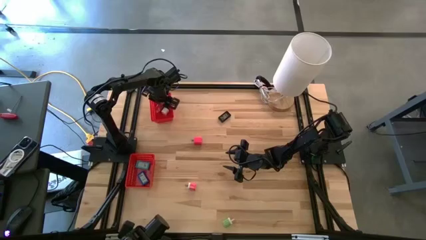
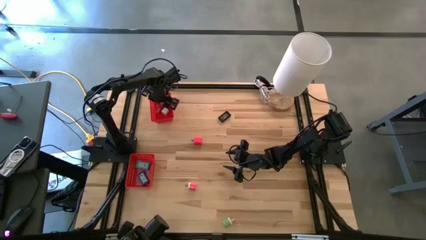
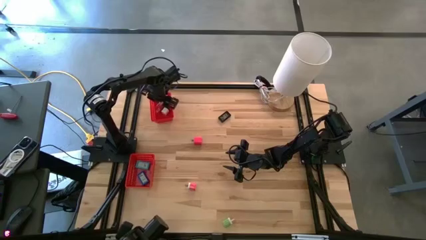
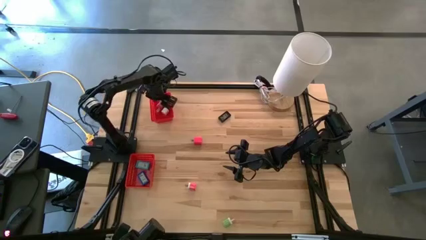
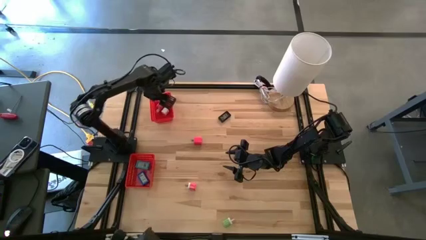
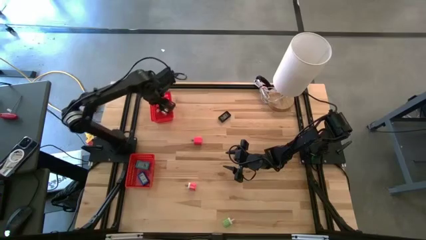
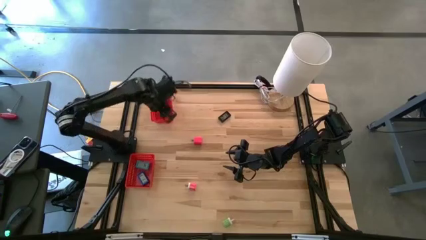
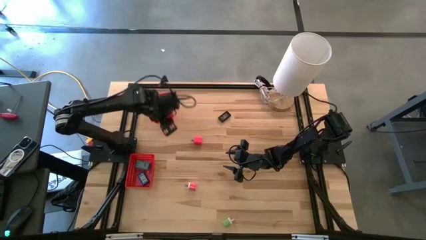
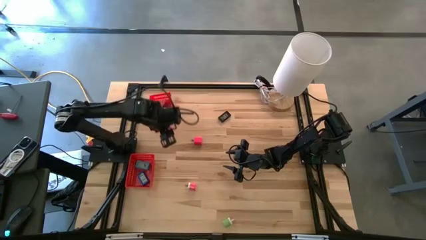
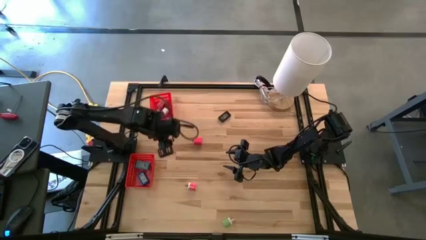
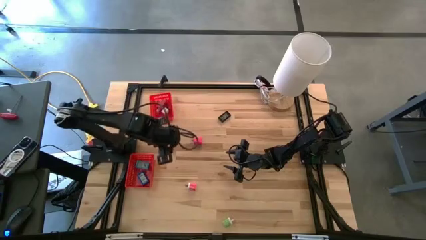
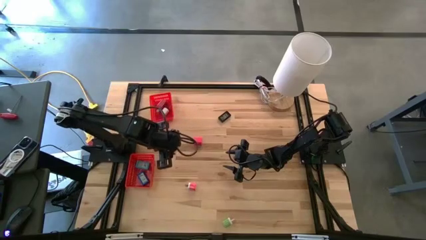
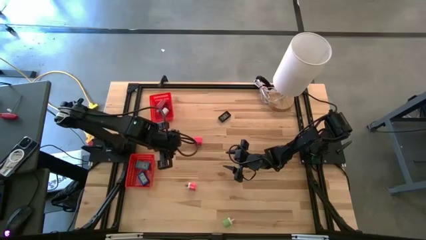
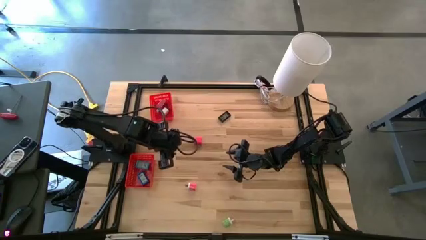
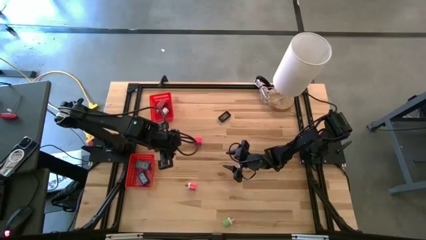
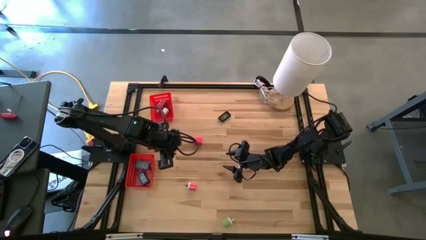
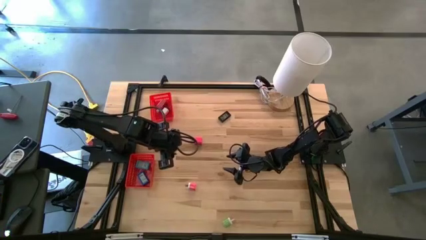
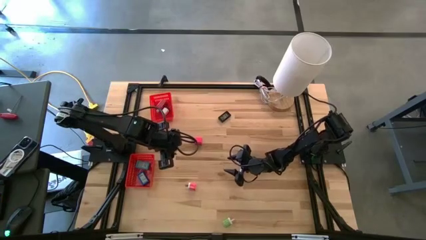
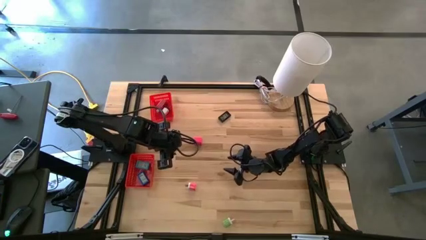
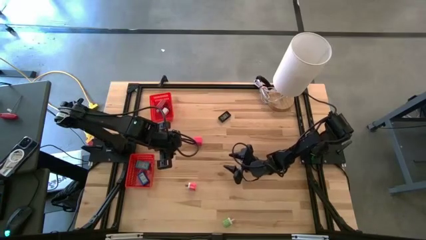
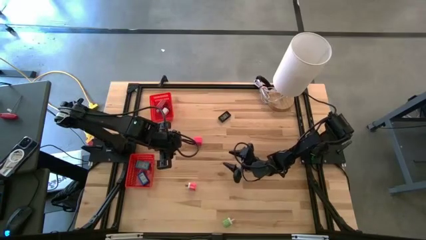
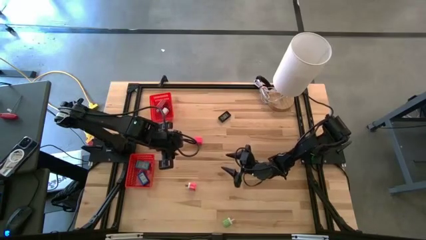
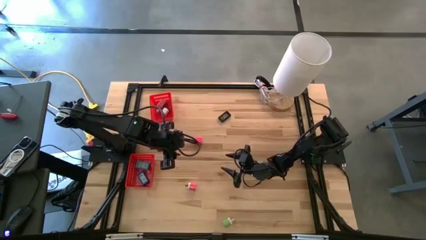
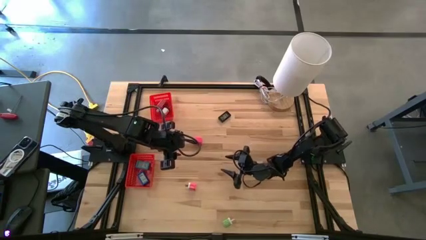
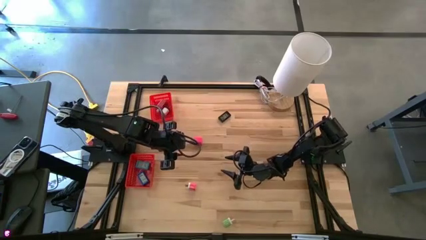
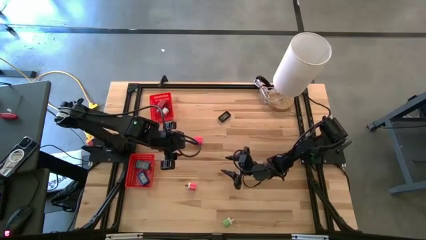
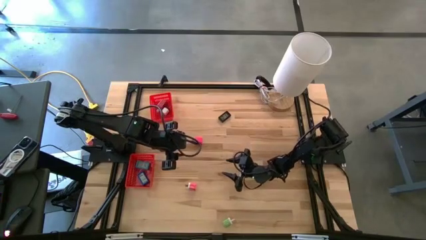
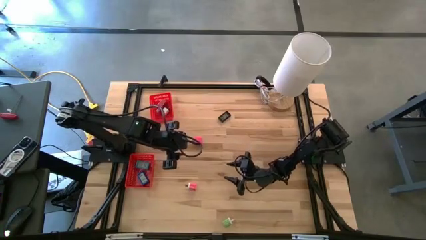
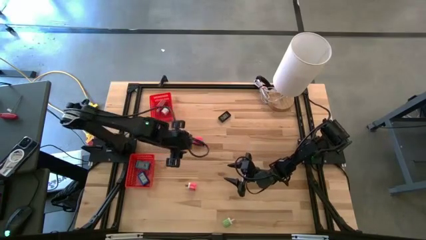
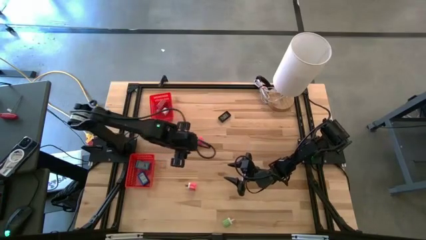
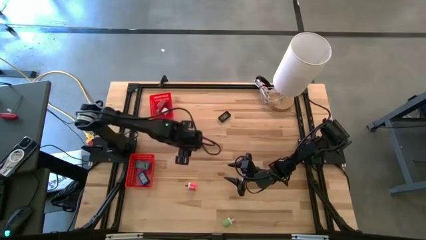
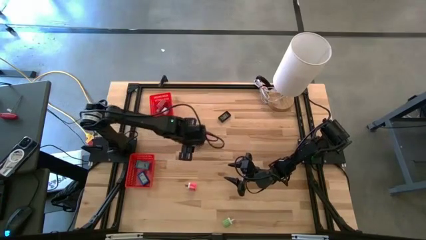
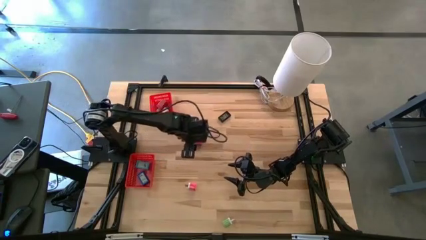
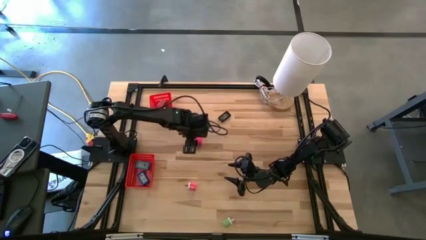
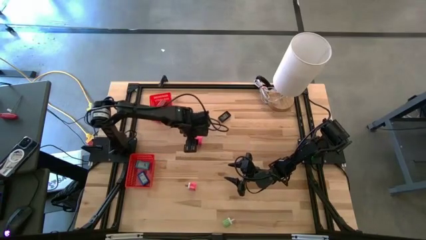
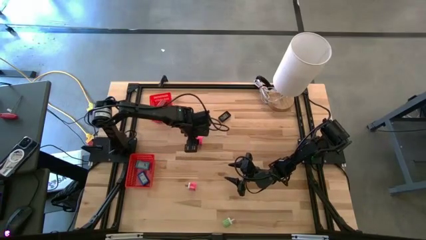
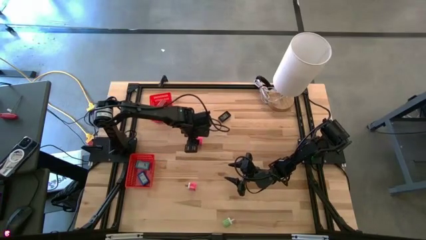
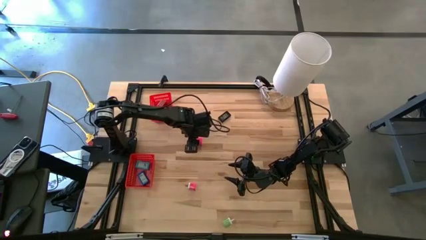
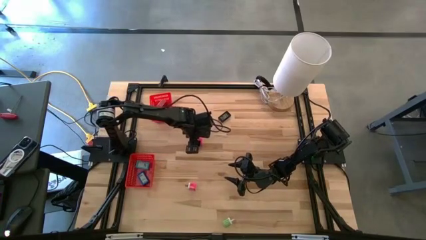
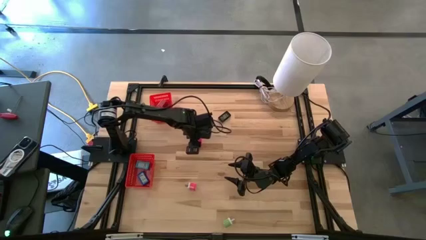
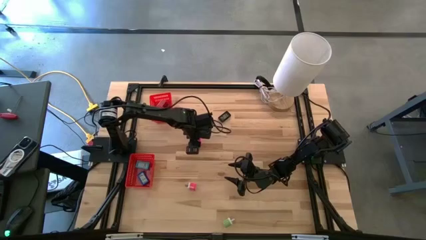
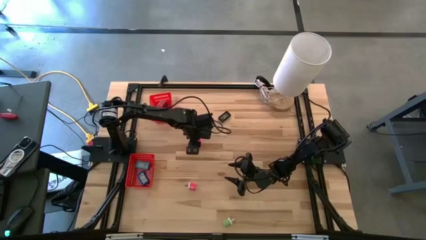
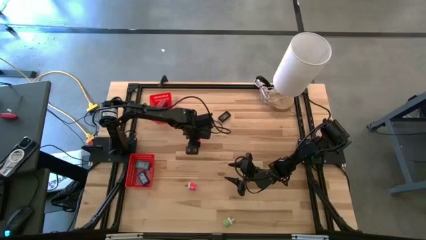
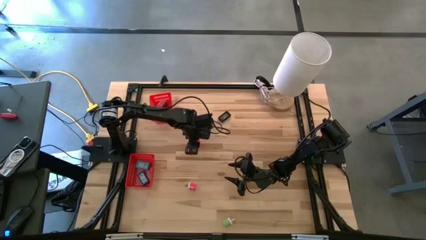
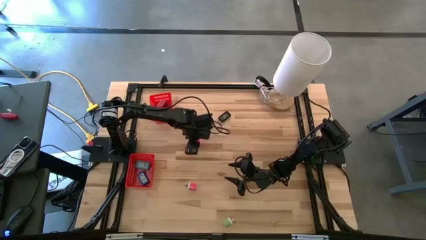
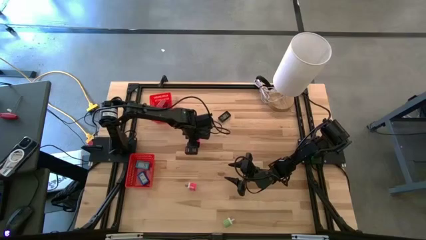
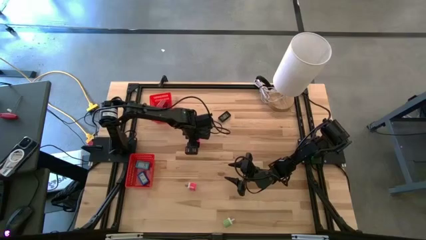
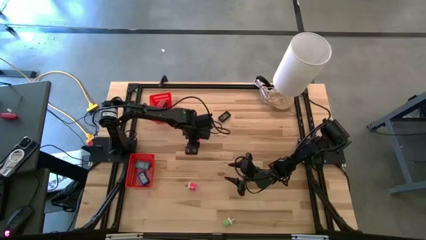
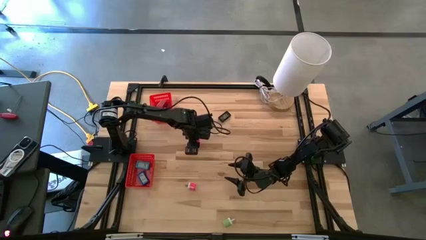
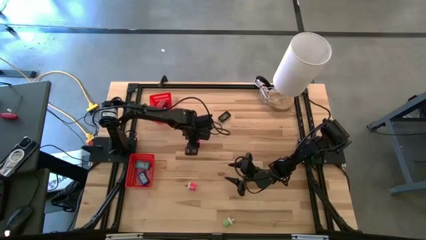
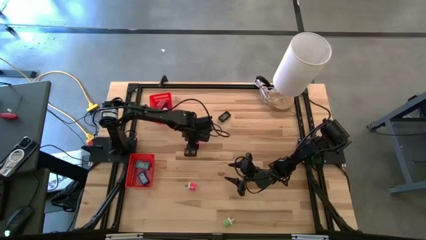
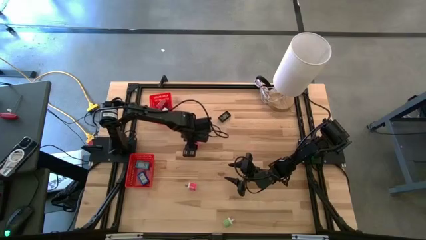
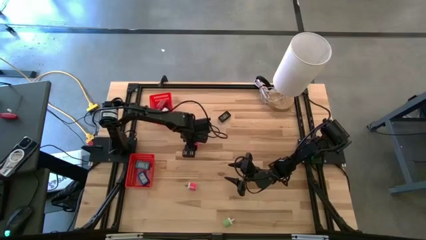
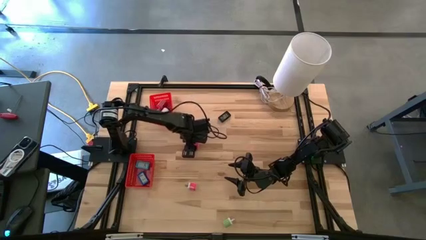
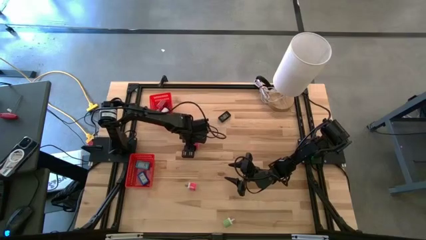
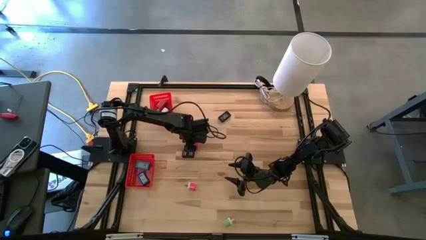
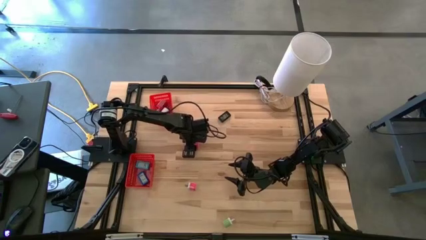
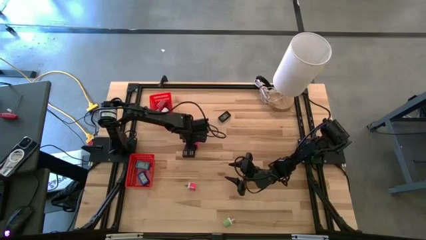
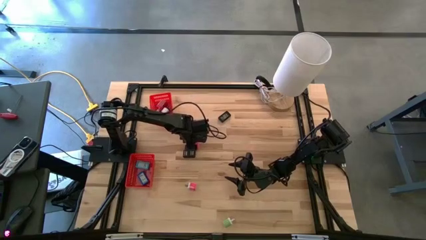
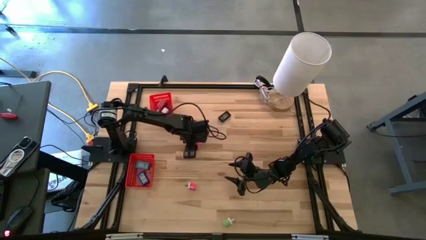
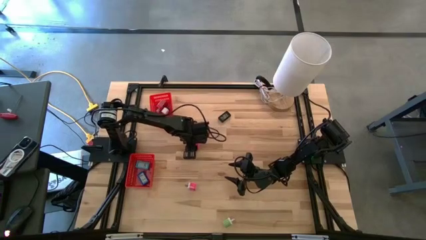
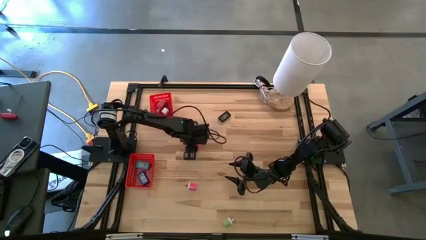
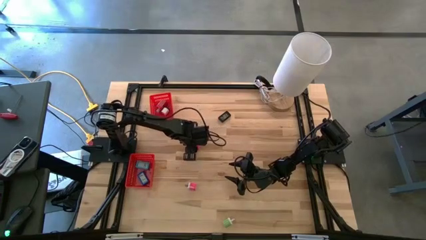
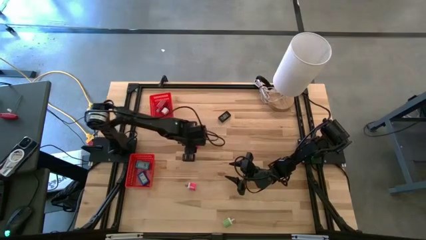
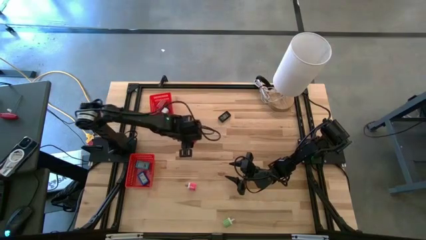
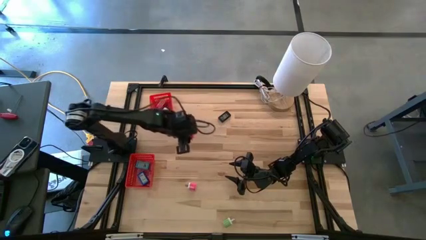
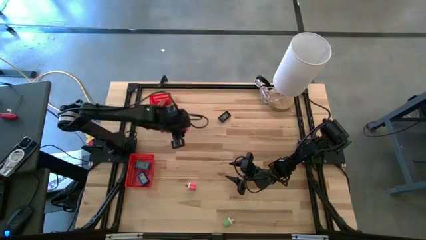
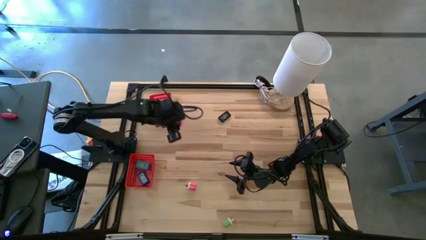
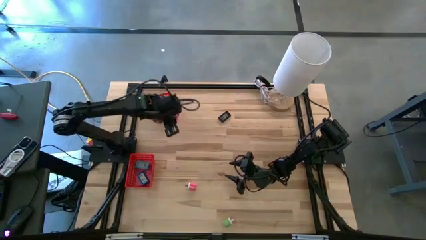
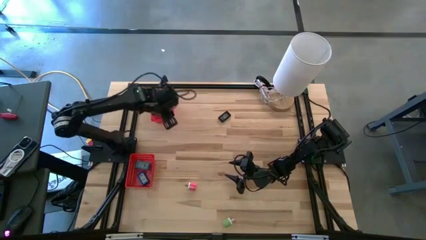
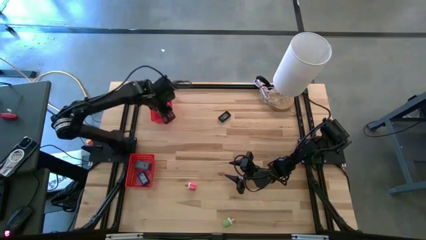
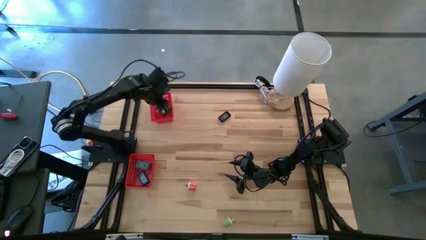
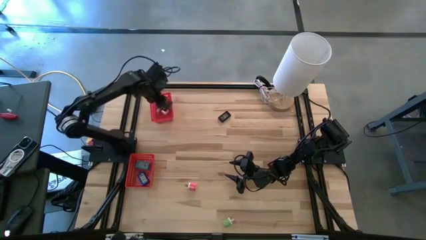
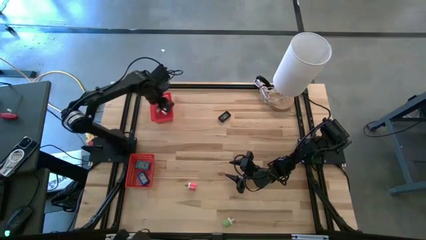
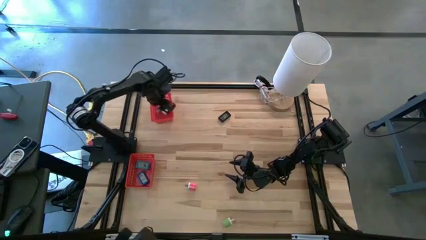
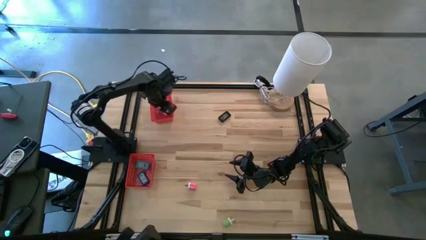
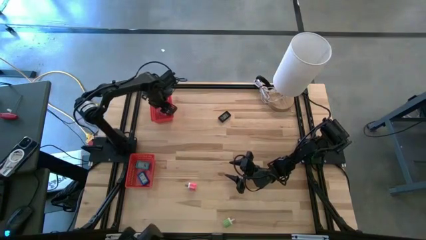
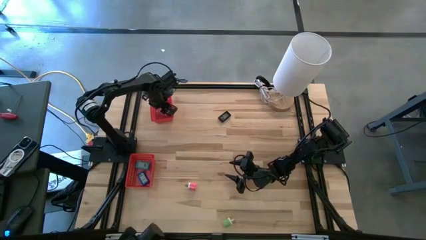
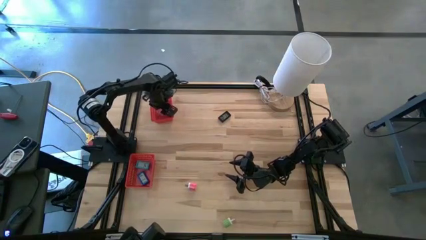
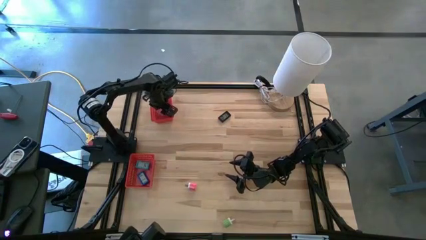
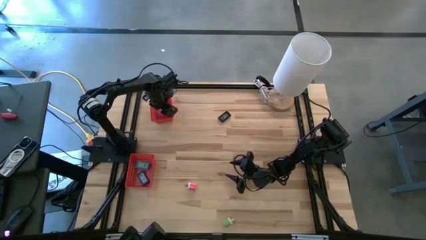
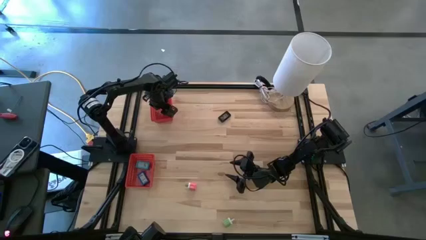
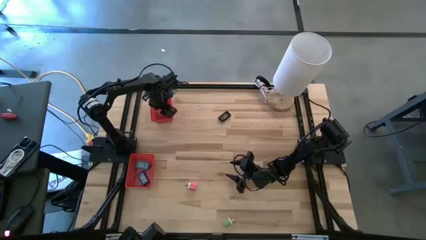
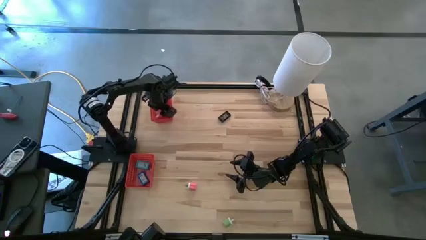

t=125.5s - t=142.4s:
Task: Pick & Place Office items
Put the top pink charger adapter into the top red bin
